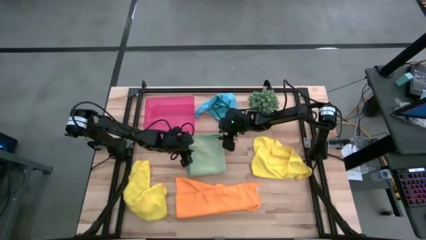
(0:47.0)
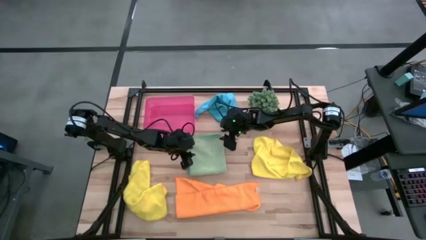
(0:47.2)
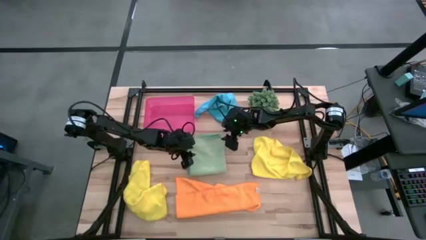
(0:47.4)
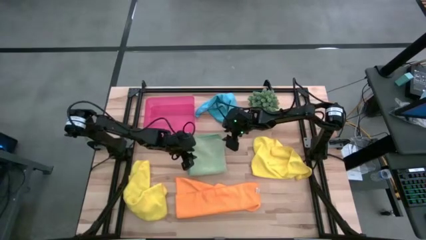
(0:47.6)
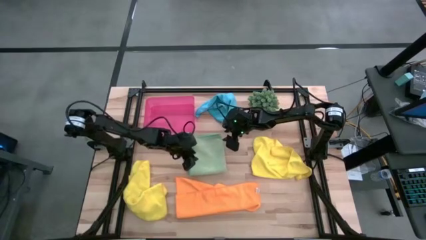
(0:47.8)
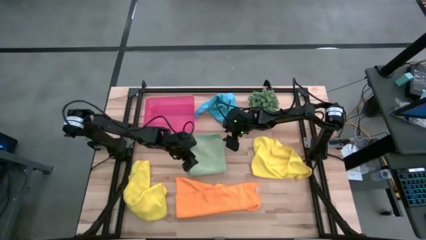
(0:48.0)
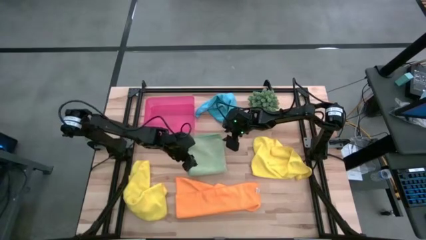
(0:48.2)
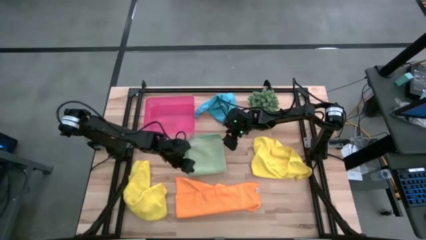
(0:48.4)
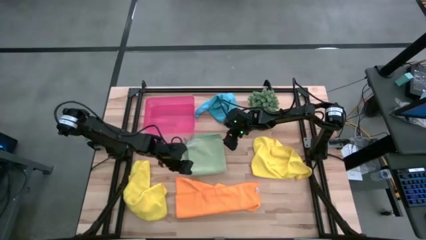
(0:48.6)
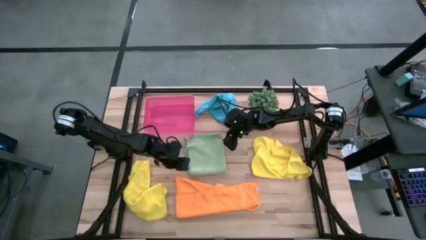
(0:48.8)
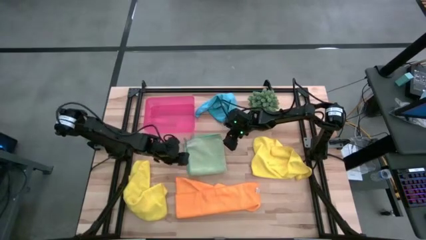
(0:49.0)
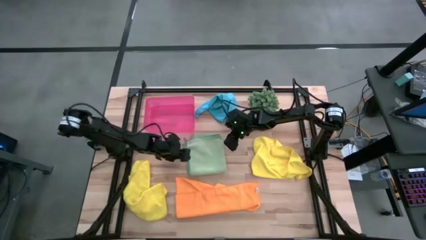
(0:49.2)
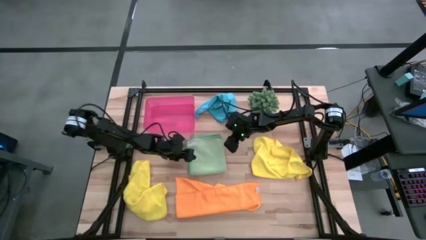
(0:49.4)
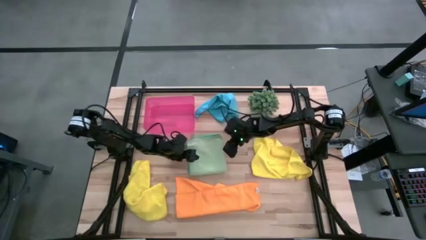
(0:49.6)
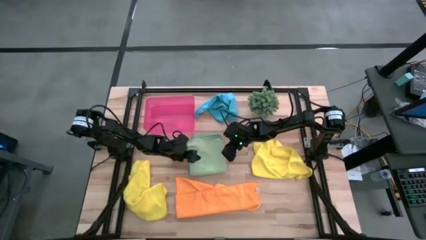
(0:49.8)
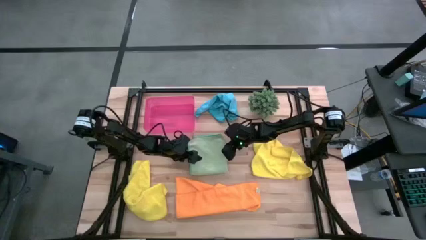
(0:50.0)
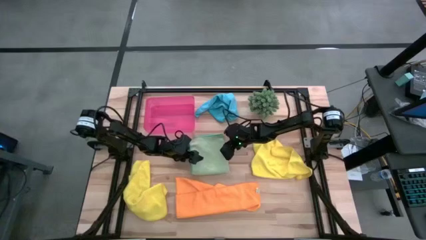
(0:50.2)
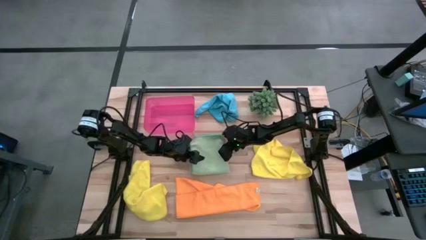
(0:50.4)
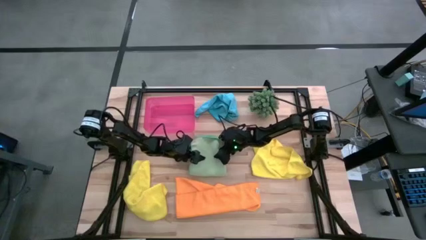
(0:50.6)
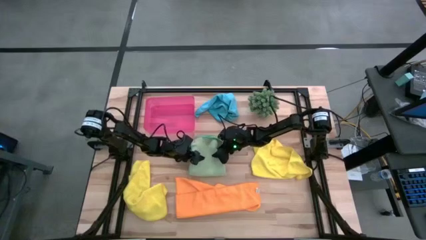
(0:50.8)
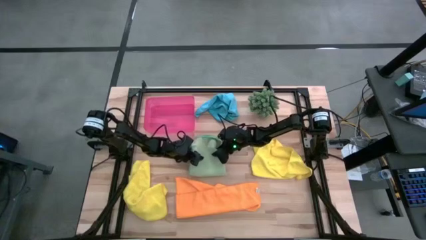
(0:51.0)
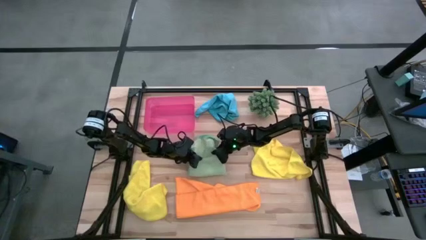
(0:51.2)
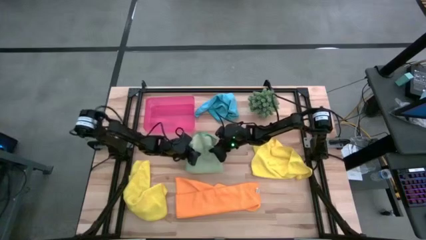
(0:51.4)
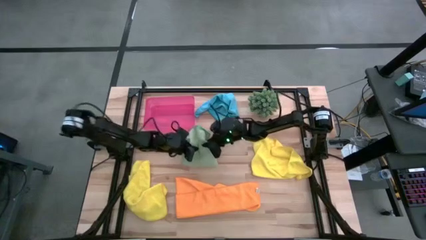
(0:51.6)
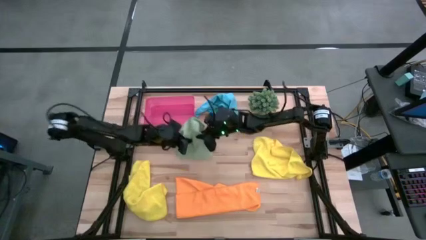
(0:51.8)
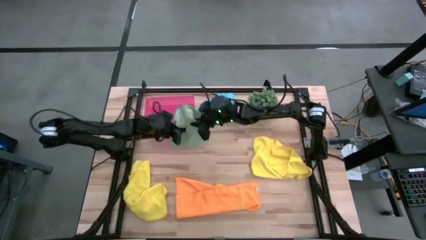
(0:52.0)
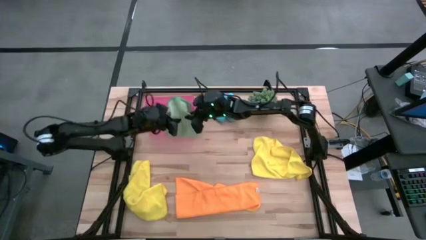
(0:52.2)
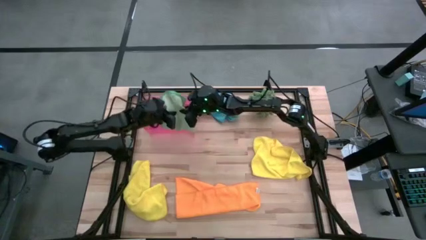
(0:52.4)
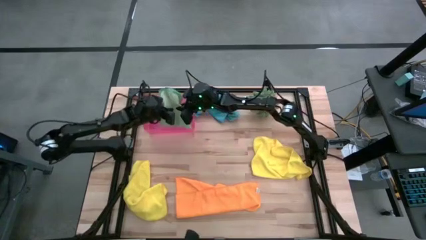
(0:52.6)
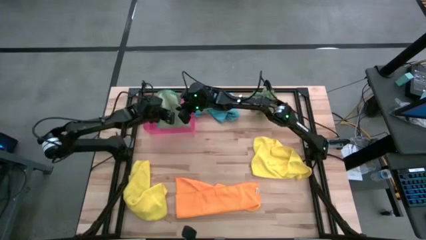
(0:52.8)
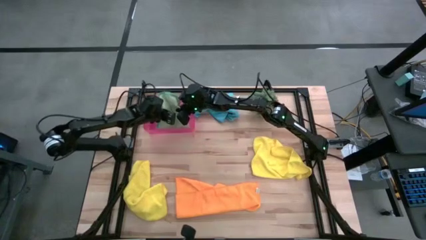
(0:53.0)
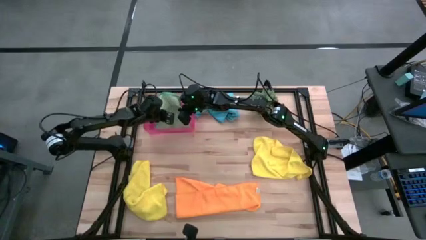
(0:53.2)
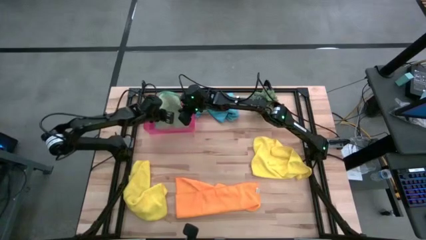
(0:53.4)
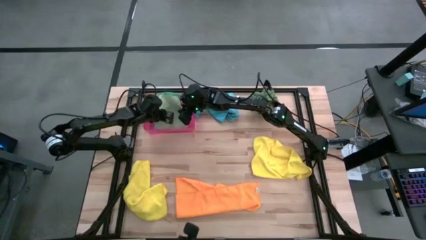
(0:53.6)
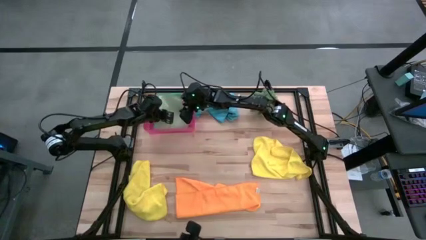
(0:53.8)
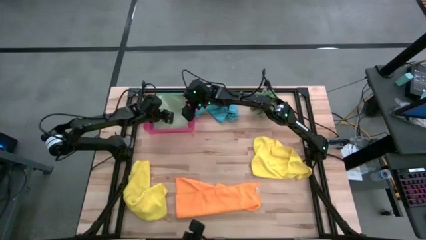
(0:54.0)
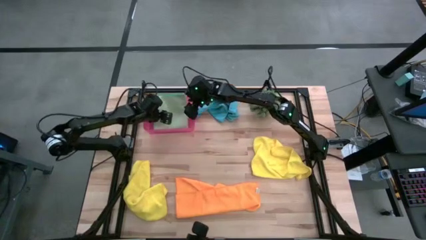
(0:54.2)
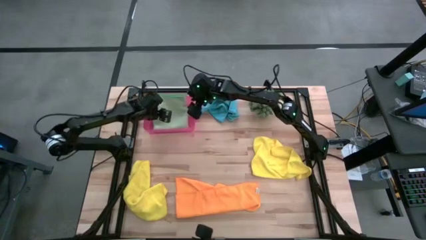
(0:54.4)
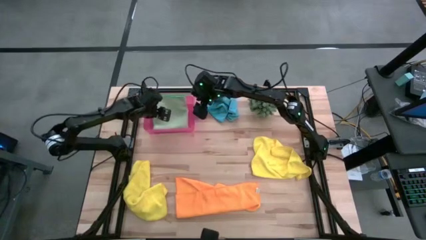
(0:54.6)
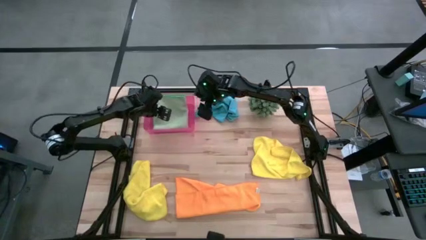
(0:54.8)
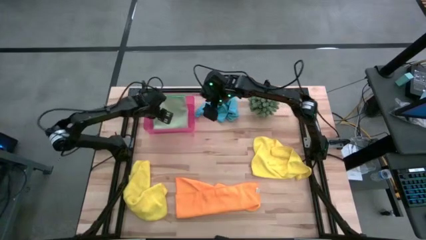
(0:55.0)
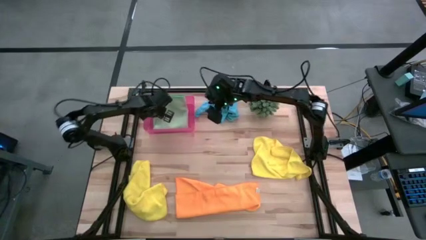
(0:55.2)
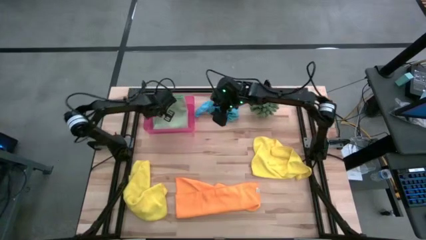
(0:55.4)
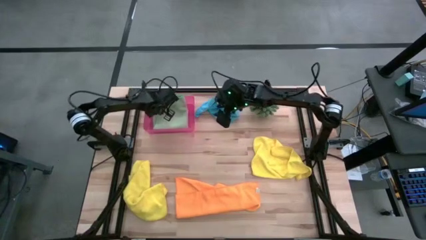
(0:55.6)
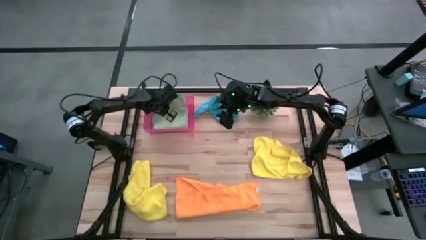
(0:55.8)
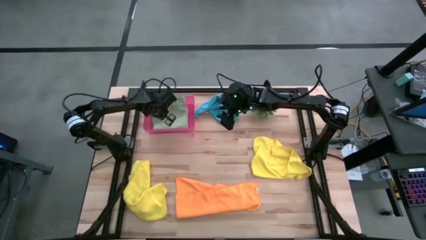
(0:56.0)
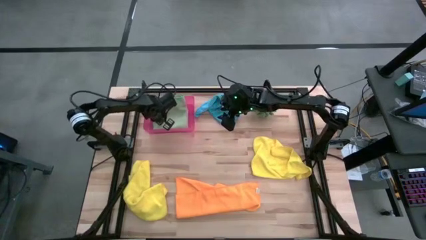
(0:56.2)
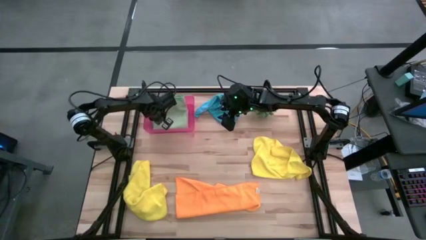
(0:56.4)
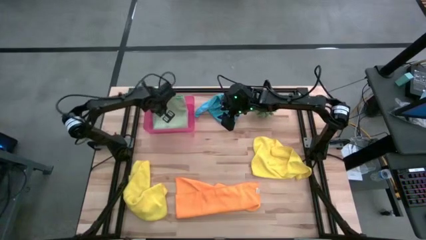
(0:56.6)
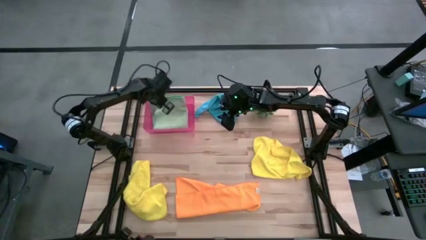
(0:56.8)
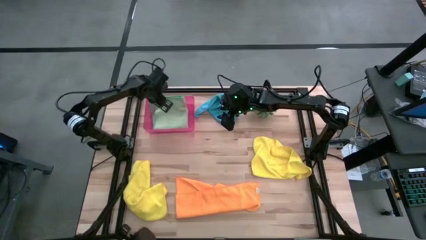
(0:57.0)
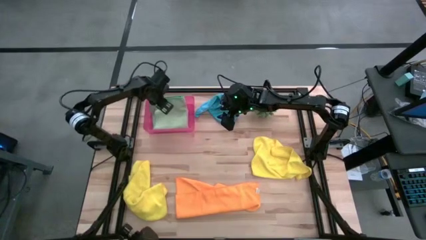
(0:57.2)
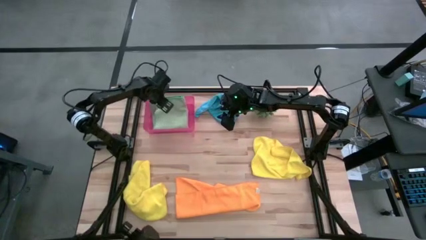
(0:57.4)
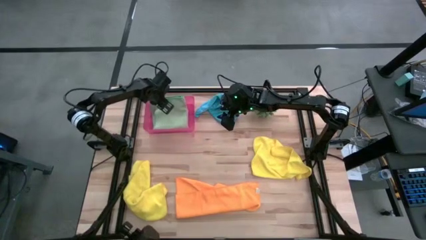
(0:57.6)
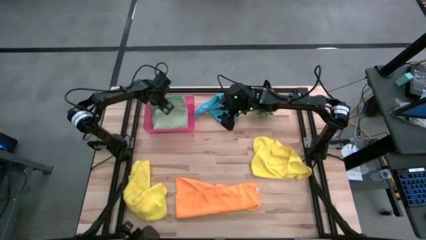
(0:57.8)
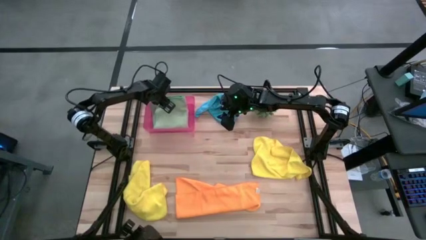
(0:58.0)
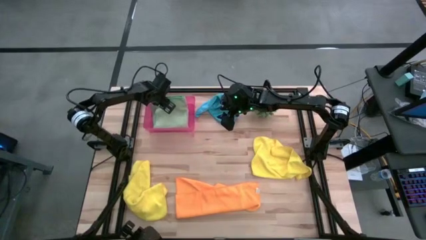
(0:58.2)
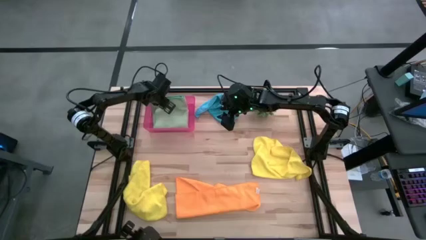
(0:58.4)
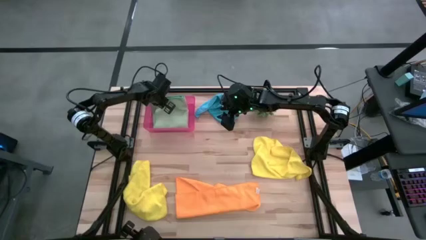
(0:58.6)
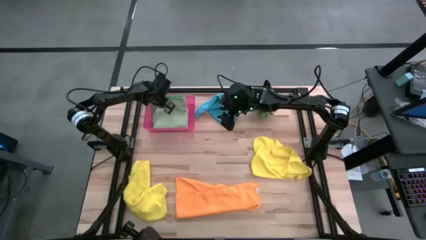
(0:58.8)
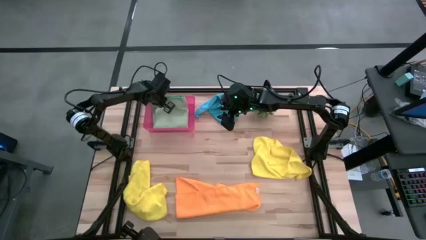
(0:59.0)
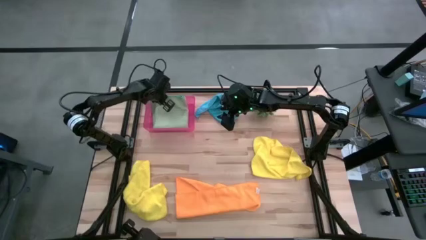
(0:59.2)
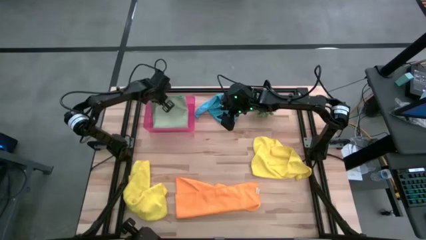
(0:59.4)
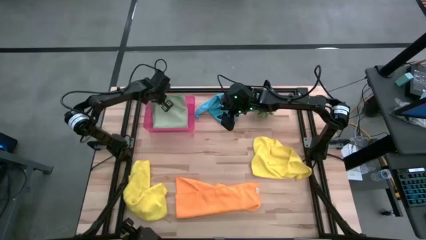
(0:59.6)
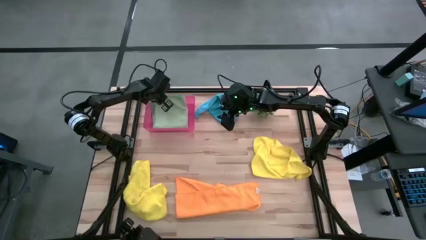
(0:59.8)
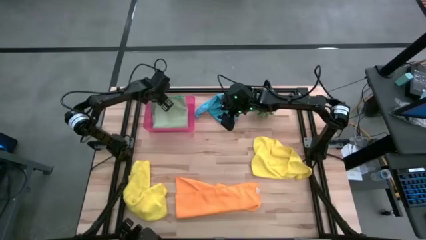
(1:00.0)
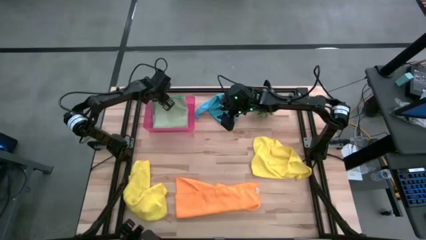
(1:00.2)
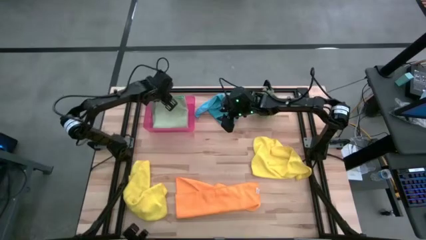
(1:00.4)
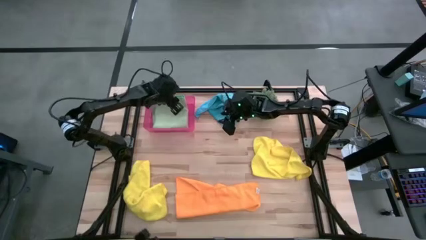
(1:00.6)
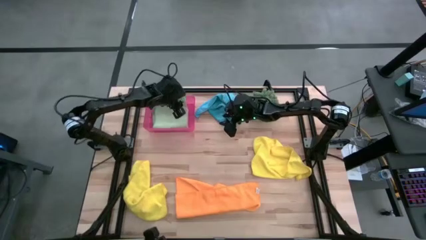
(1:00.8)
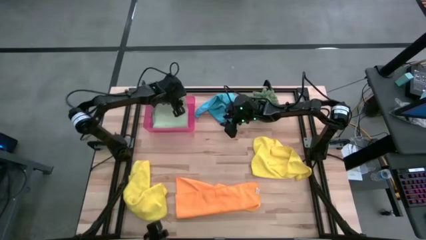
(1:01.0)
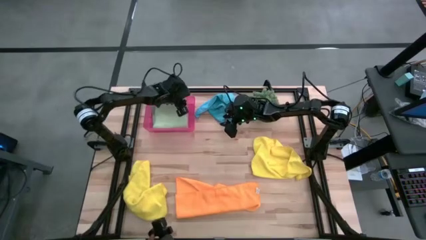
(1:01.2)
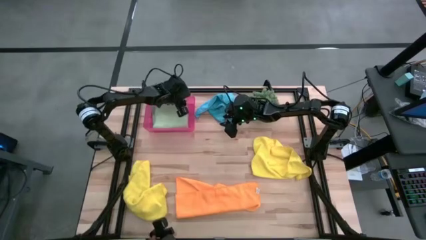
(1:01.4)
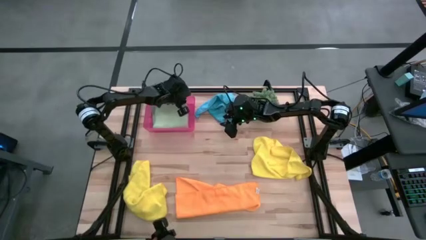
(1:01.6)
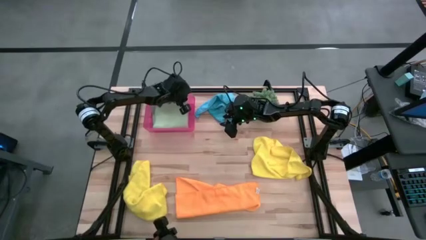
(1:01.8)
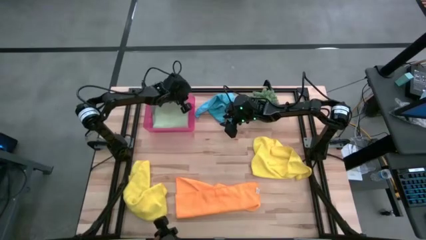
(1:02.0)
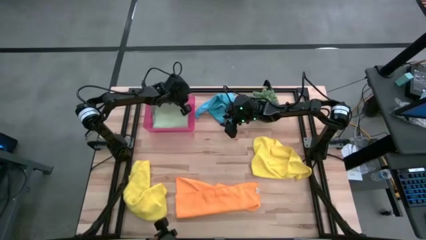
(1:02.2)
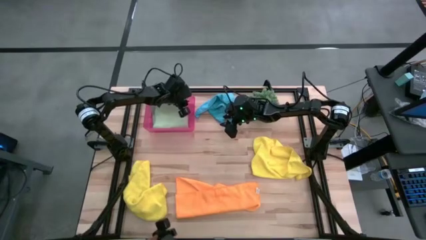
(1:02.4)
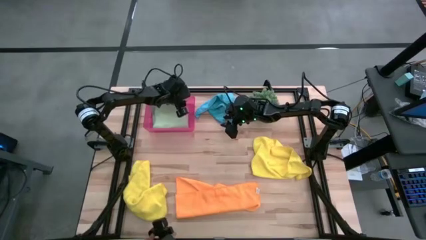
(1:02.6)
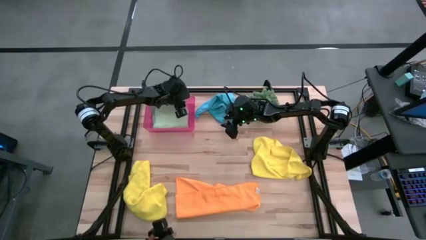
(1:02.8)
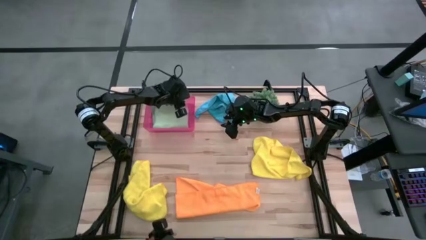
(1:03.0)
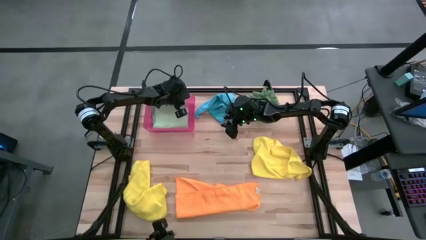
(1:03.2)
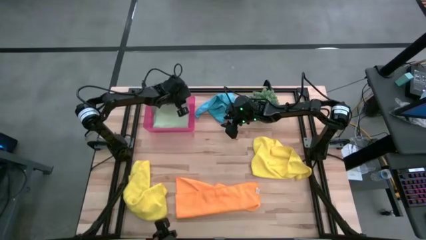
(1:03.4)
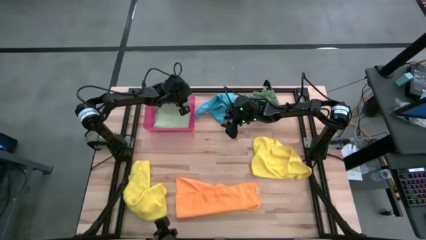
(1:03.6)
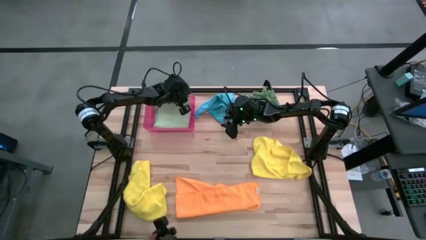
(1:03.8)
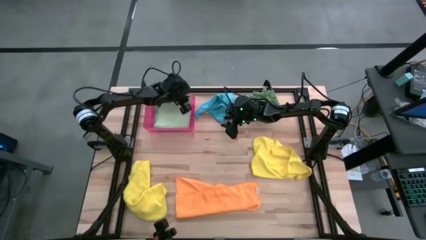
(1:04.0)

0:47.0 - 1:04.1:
Task: Fold microfiber towels
Put the green towel into the bin
